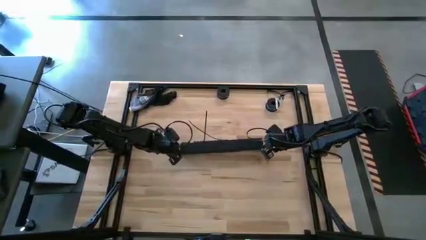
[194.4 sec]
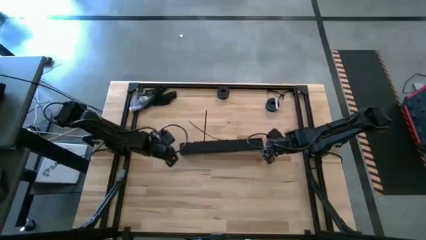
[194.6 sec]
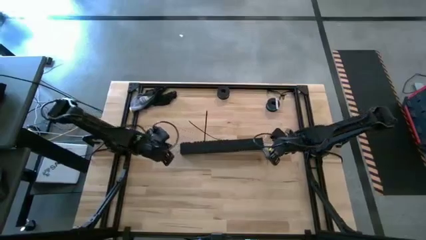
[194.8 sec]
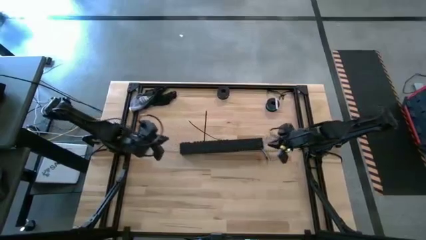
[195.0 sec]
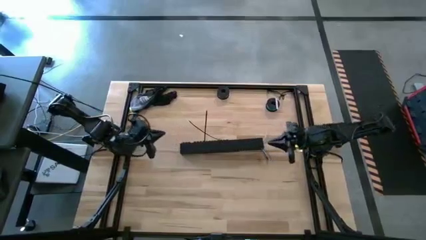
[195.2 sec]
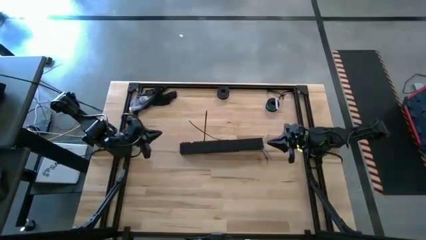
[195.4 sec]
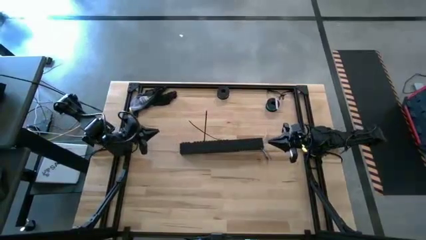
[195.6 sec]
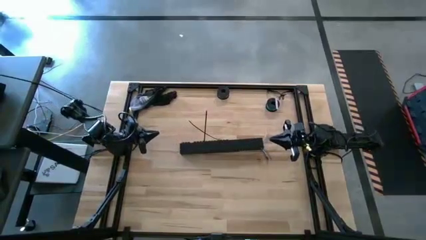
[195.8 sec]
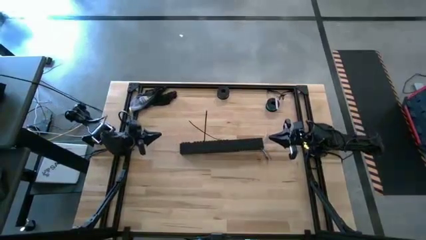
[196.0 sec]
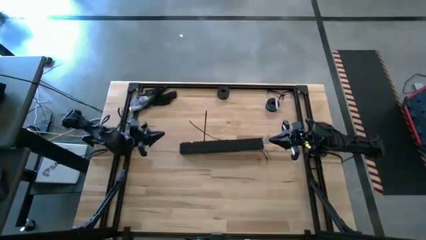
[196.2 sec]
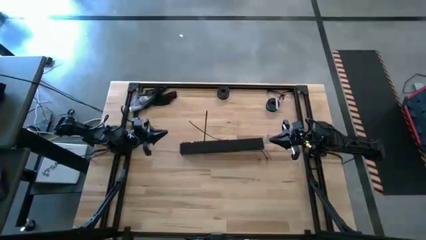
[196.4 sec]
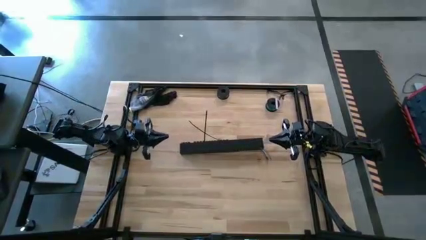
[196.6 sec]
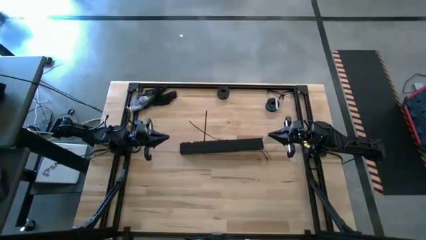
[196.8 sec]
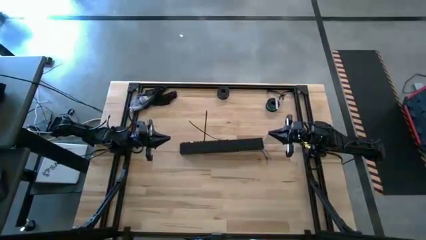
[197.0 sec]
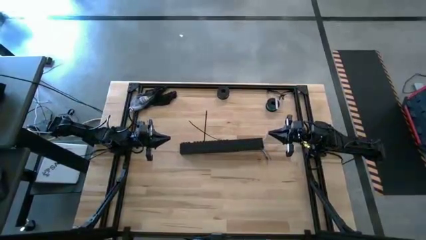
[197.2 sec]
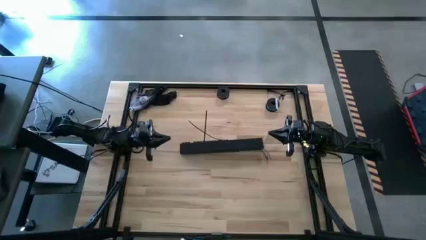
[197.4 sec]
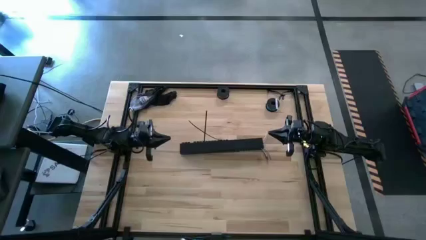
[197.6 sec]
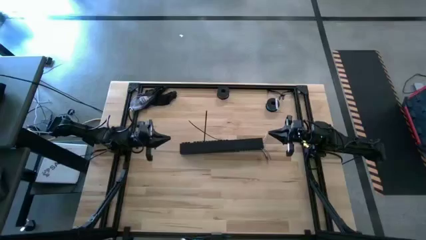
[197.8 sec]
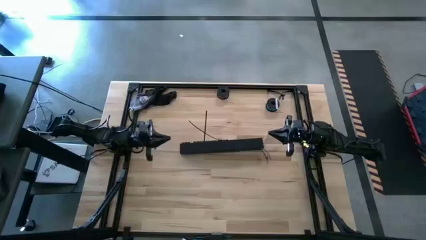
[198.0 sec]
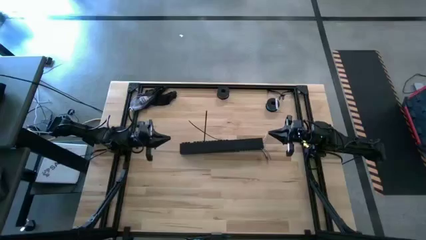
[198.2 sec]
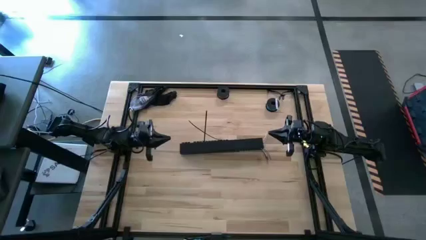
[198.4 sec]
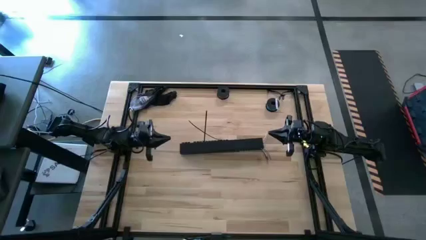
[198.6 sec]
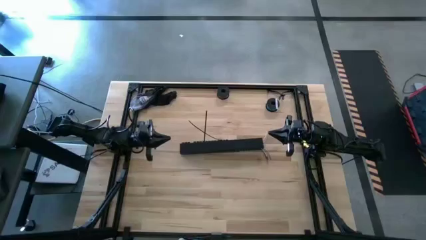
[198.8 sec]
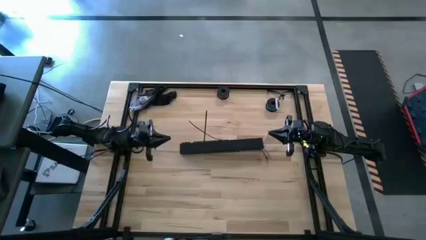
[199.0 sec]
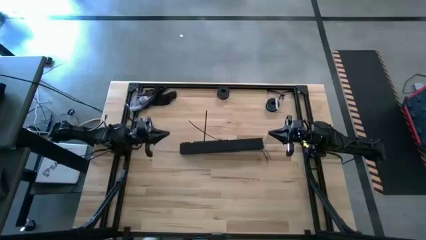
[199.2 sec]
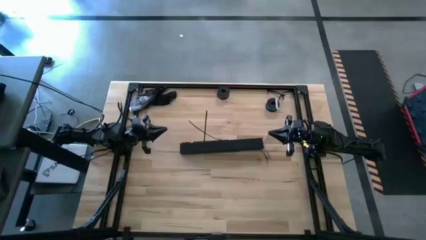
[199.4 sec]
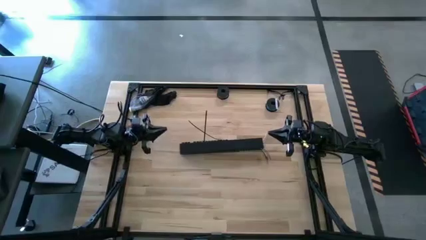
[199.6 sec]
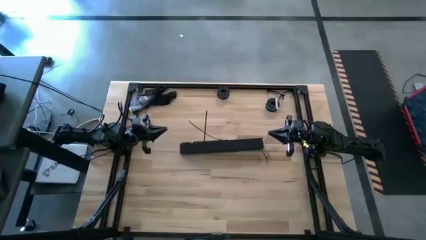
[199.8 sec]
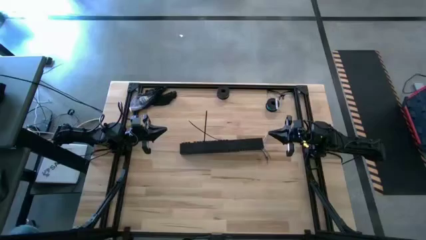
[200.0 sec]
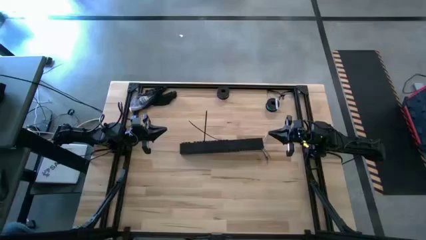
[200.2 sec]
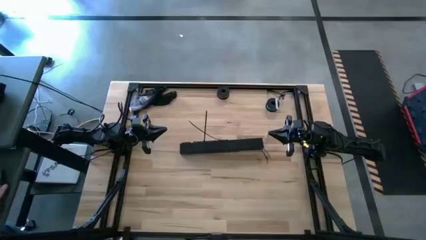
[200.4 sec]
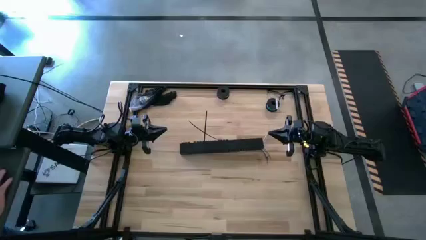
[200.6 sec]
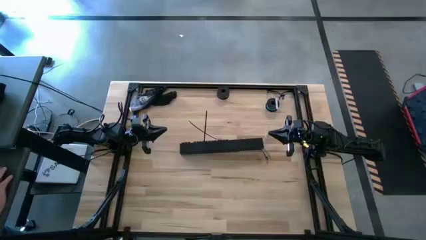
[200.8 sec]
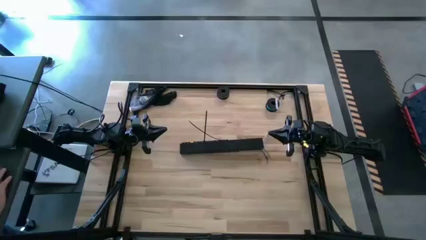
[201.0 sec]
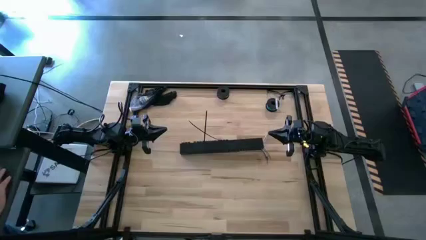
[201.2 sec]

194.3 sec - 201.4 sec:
Task: Ziptie cables
Return to Home Position

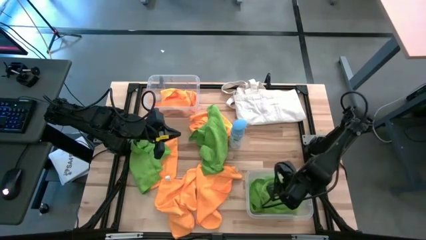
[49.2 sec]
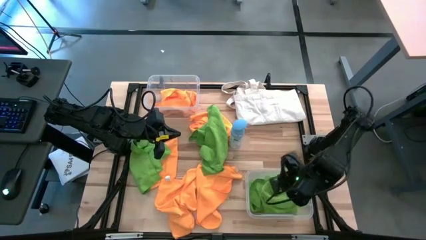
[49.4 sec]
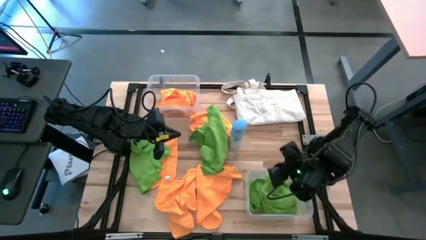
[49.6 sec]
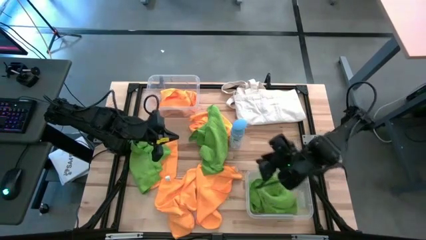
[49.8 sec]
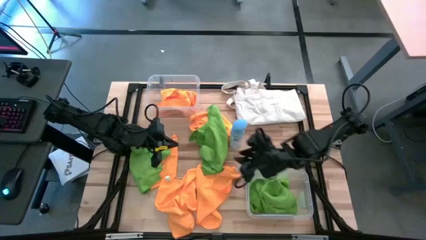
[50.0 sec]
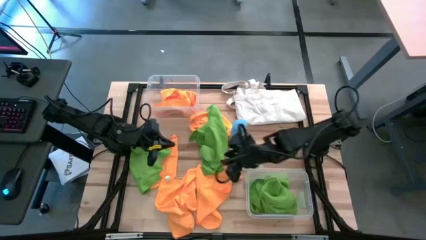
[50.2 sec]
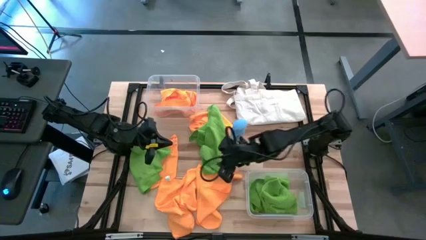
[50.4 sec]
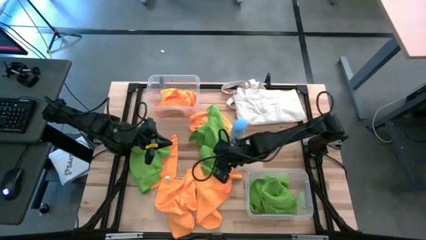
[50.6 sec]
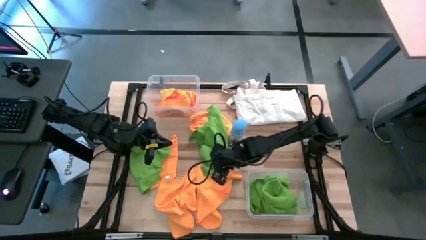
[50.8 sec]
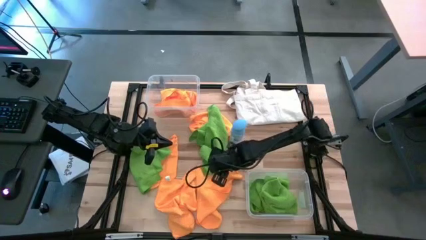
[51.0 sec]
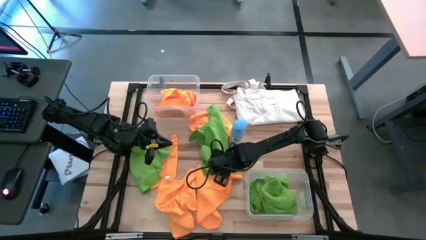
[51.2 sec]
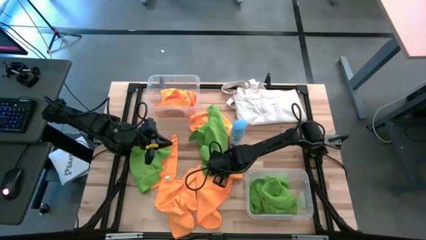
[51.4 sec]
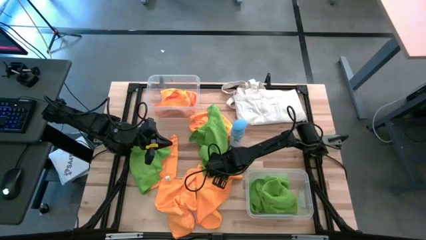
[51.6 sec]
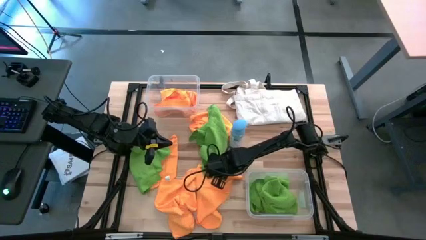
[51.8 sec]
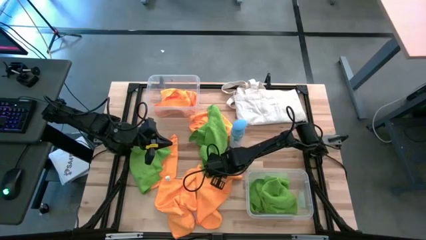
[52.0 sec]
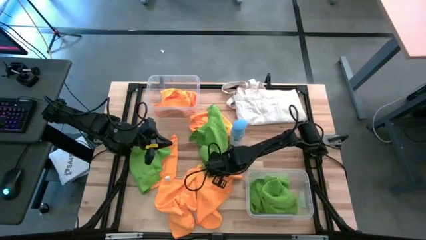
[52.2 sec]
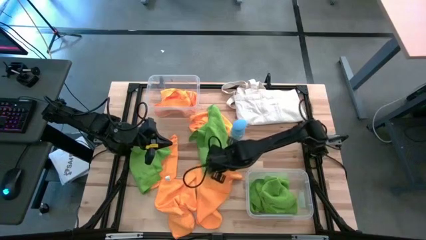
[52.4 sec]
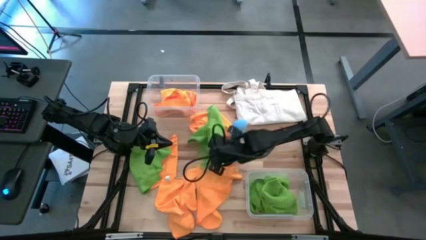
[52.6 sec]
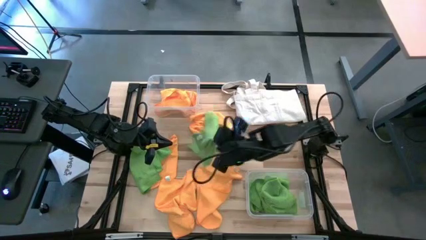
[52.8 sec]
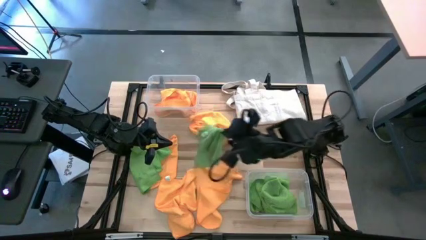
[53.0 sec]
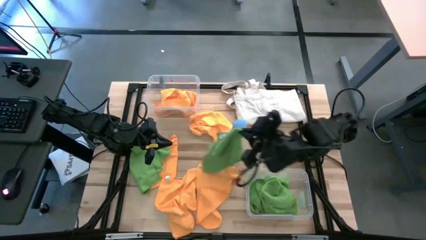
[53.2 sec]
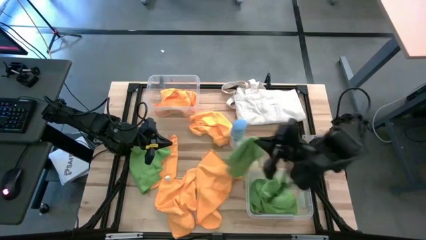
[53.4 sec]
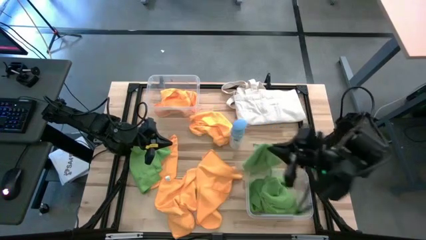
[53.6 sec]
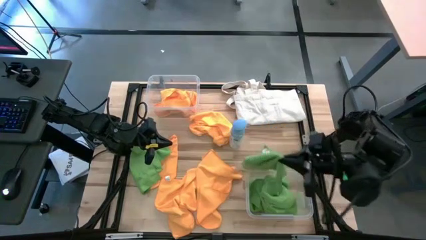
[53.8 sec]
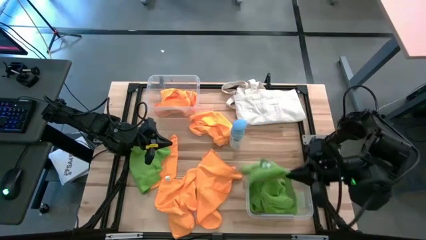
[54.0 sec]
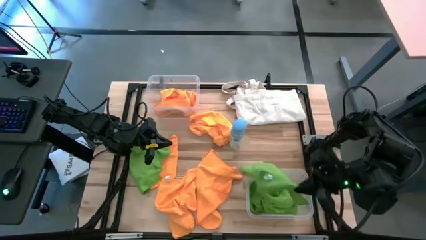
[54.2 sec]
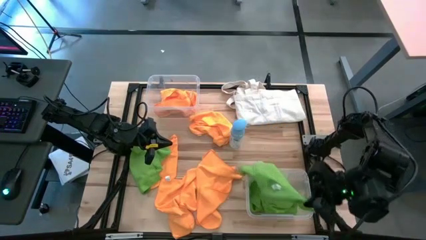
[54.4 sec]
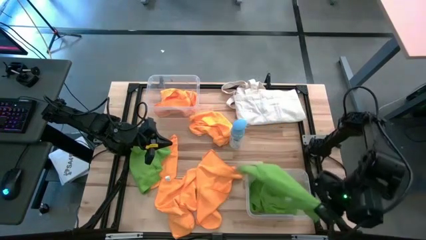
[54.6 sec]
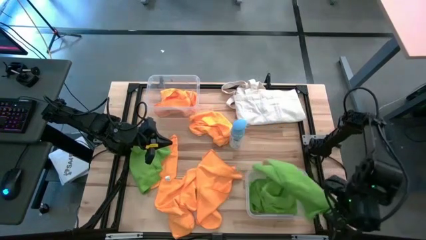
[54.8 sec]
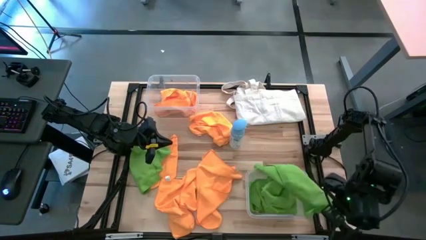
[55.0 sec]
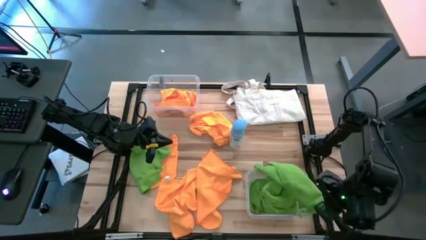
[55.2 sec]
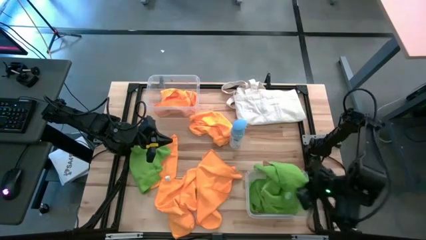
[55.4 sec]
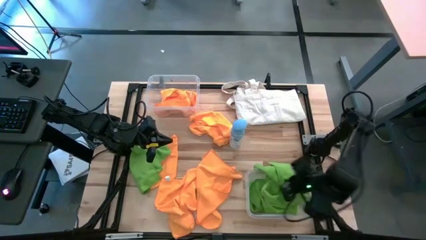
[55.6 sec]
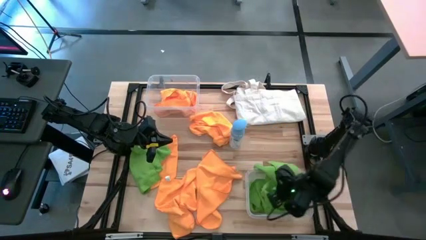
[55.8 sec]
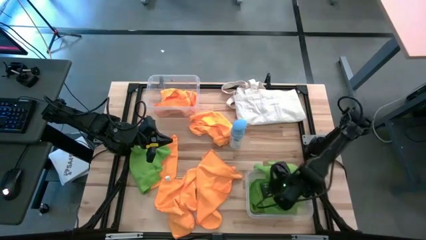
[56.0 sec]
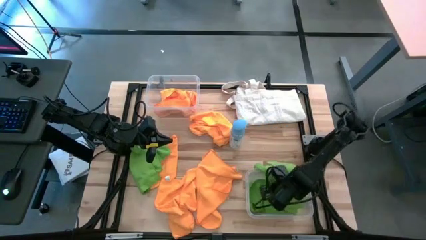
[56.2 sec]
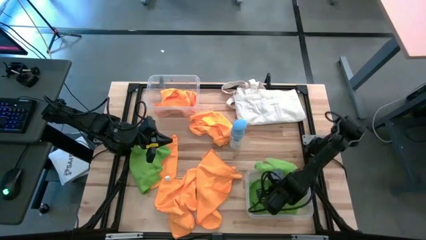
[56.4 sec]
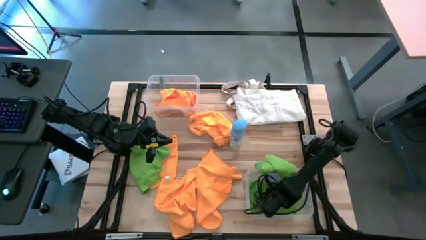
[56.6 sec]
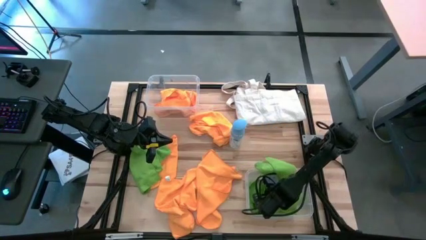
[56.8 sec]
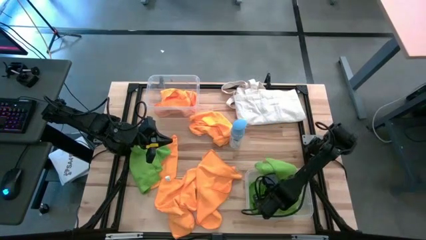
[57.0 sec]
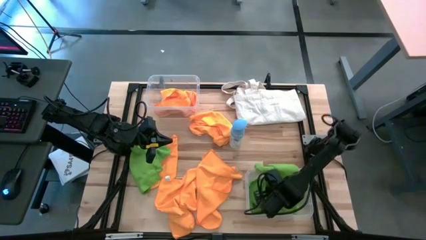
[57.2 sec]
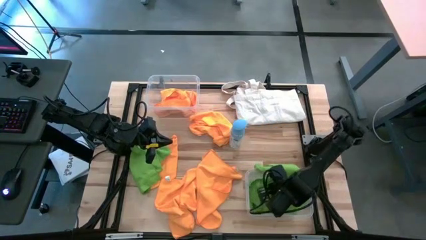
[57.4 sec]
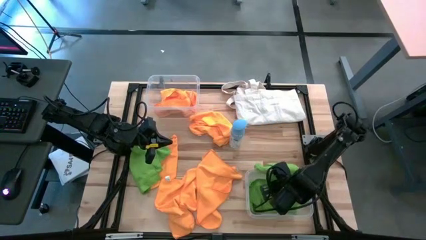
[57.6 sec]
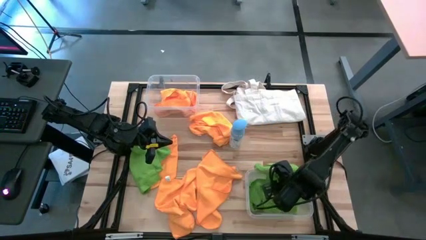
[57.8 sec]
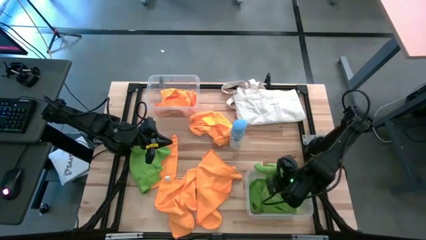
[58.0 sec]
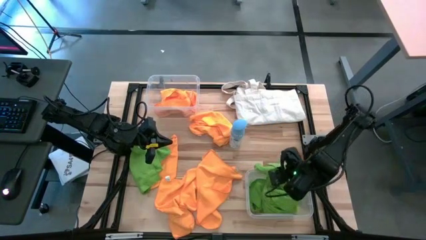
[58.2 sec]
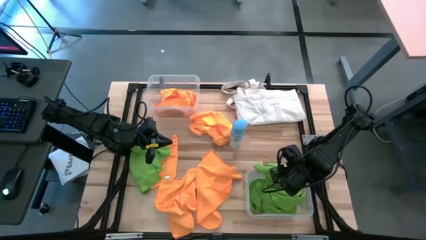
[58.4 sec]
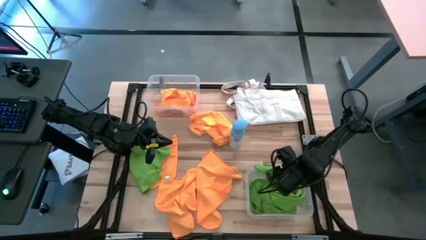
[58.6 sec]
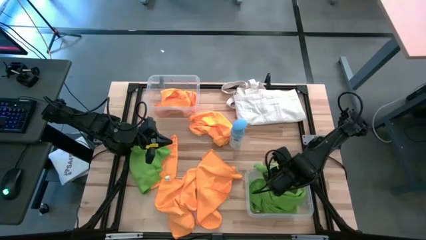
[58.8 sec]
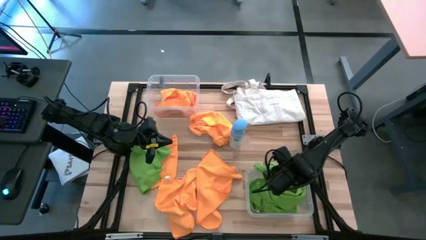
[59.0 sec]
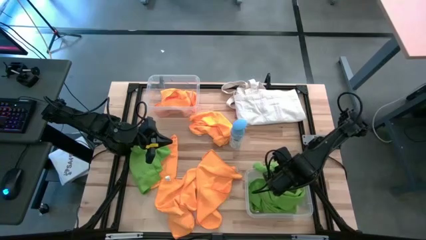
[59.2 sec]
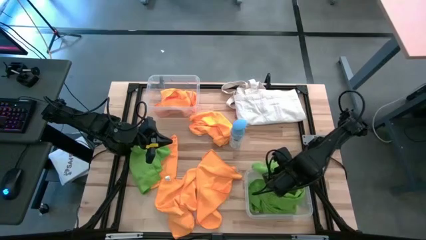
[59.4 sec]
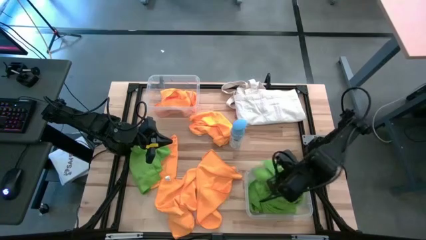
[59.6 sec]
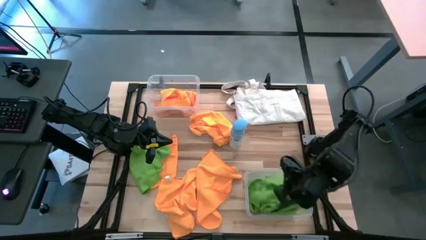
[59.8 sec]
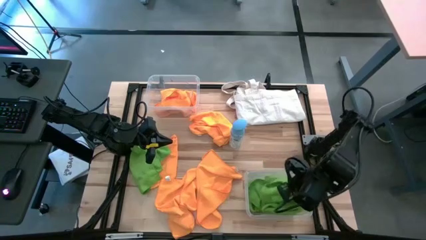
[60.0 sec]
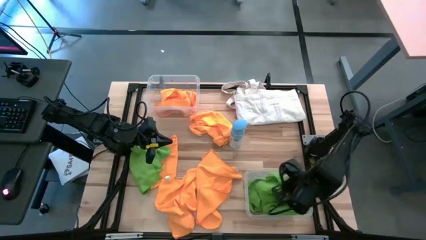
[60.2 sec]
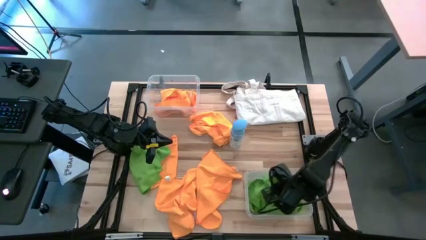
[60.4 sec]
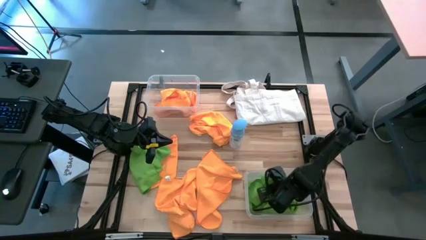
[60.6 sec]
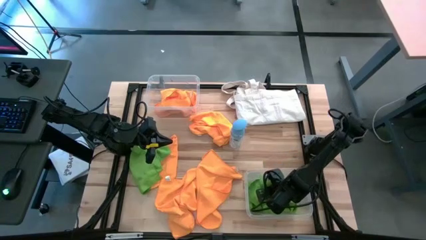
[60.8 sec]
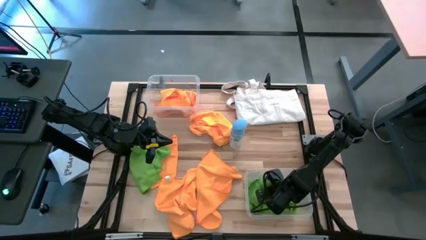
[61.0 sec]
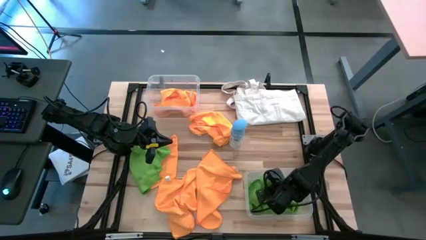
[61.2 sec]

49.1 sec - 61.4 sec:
Task: Sort microfiber towel by color & place in baskets
Put the green microfiber towel into the bottom transparent bin
